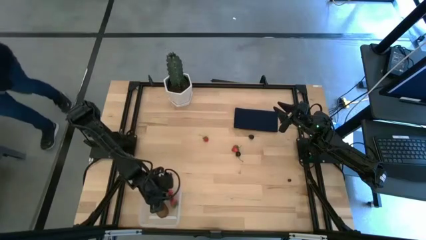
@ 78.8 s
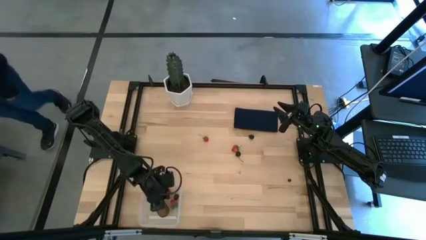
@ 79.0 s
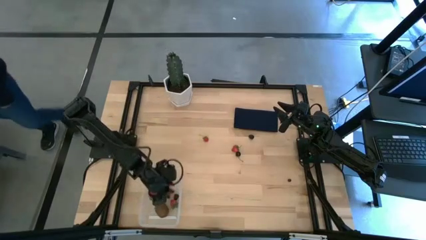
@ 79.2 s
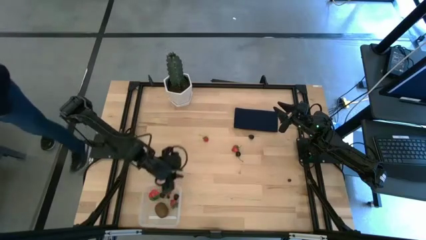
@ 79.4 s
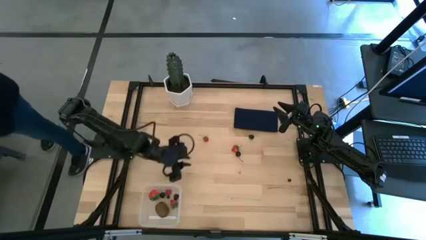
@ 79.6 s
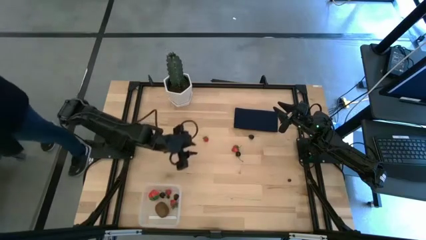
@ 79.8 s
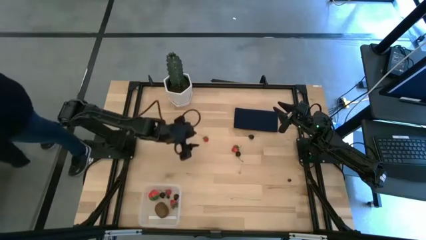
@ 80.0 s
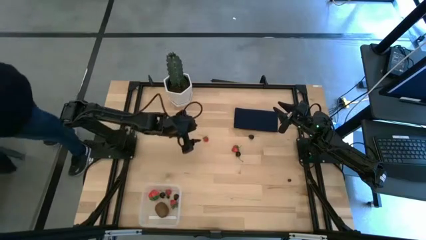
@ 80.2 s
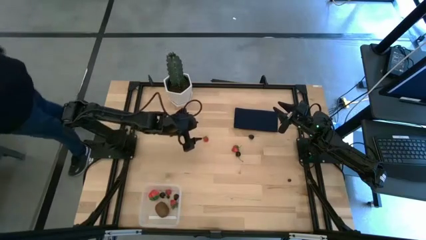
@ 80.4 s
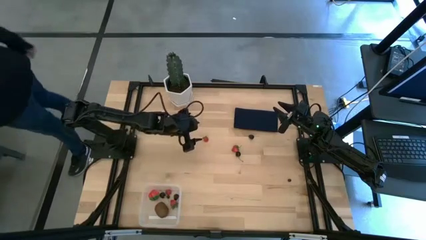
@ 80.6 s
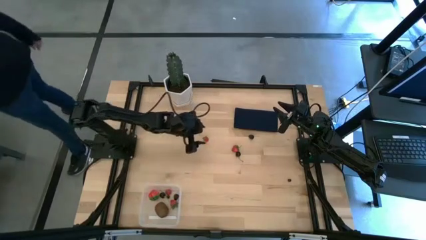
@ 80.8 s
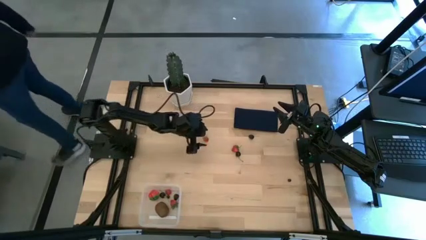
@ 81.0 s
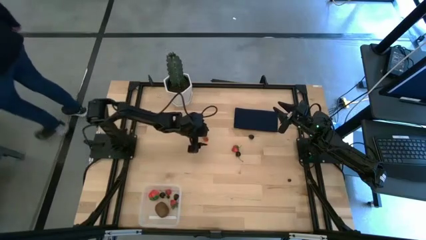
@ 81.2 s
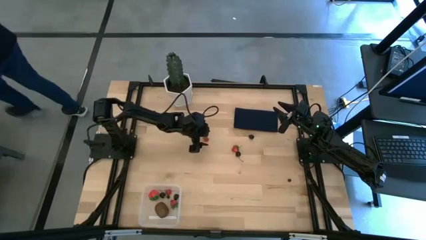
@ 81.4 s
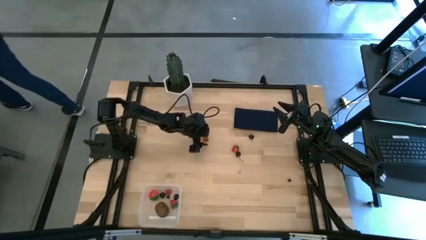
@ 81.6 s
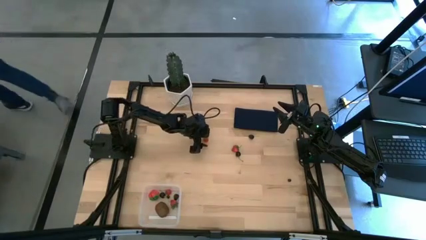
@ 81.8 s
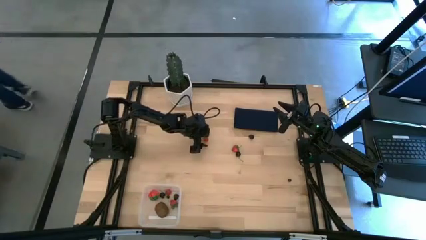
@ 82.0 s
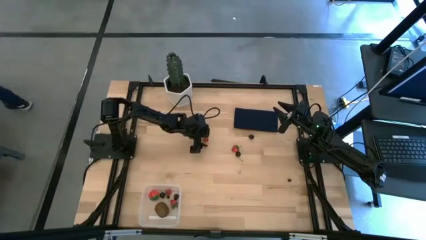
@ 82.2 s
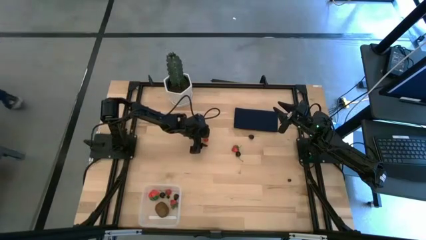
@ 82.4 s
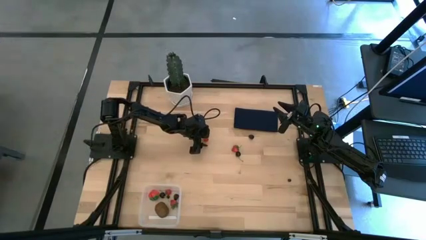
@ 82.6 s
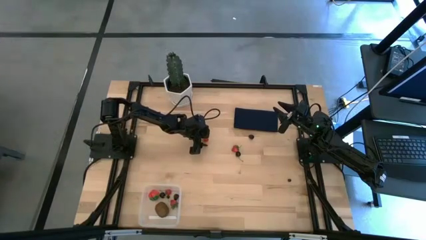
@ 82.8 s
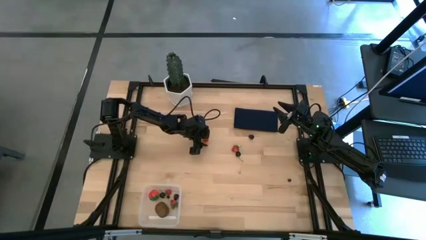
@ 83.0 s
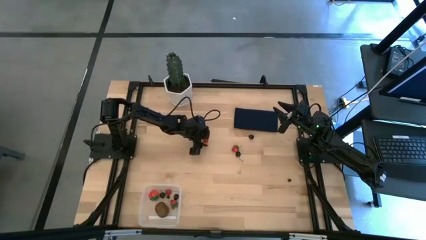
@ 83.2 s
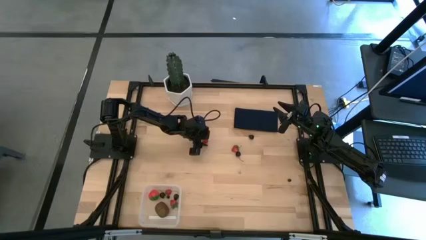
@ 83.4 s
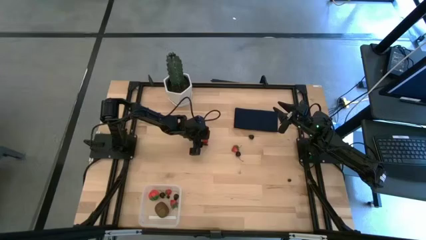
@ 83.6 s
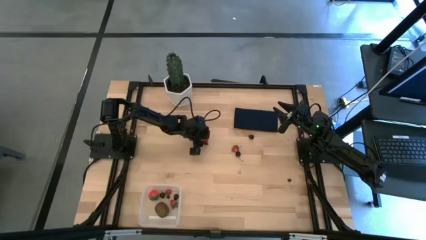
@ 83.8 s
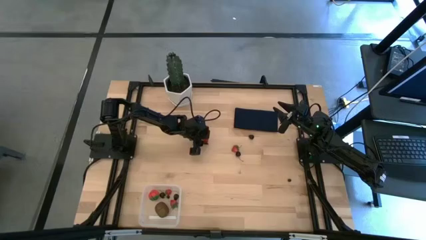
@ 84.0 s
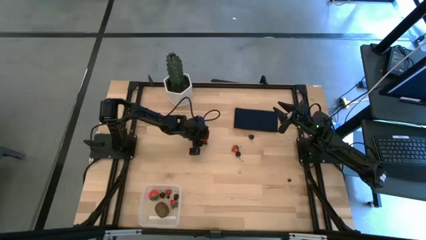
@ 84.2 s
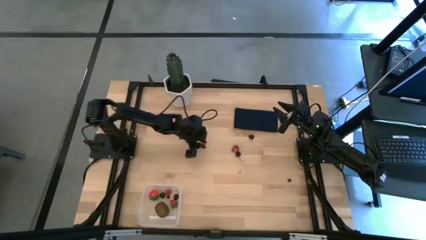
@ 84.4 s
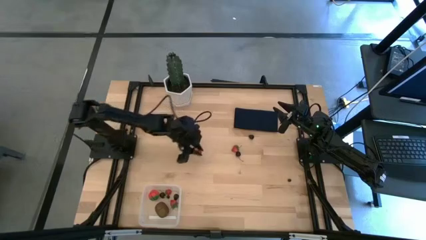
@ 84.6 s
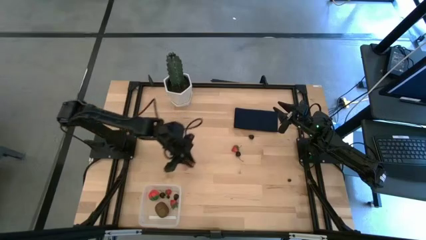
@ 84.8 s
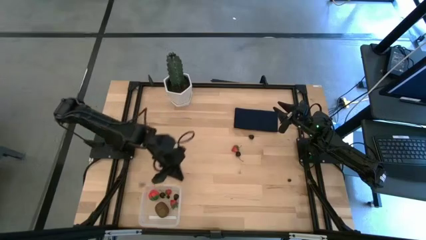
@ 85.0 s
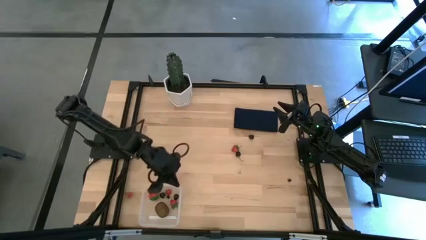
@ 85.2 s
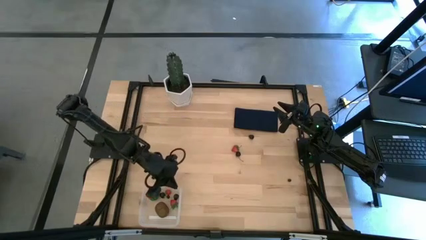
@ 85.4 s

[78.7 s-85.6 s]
Task: Pick and placing Produce into tupperware
Put the strawberry in the transparent bin

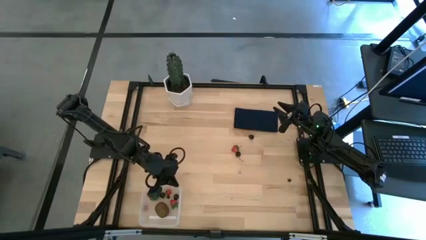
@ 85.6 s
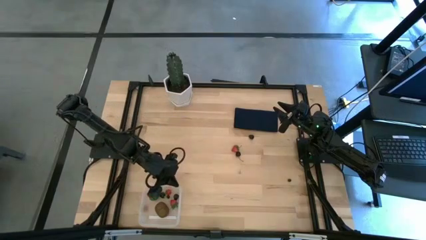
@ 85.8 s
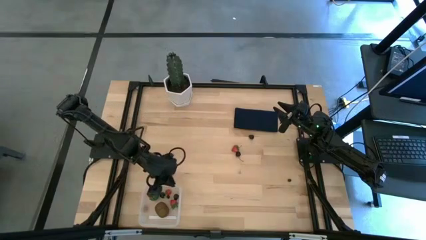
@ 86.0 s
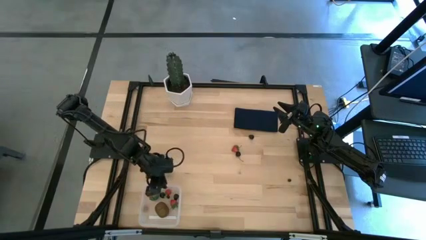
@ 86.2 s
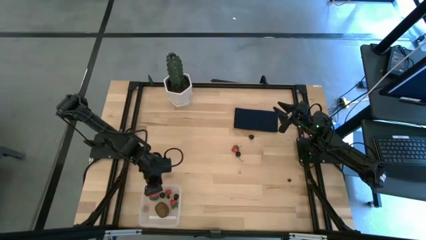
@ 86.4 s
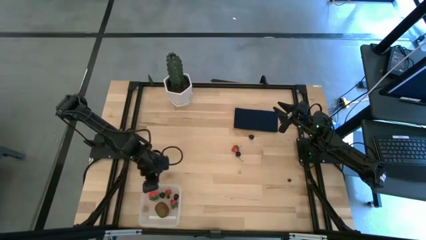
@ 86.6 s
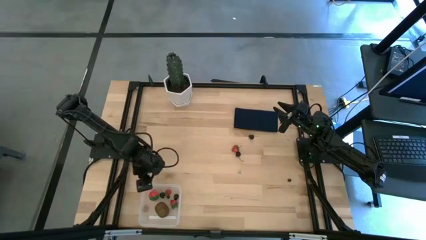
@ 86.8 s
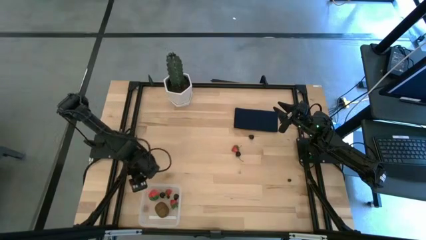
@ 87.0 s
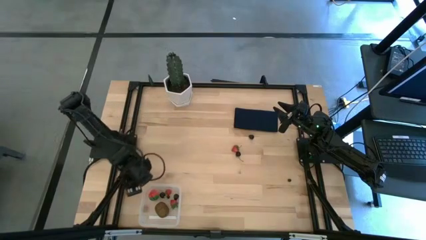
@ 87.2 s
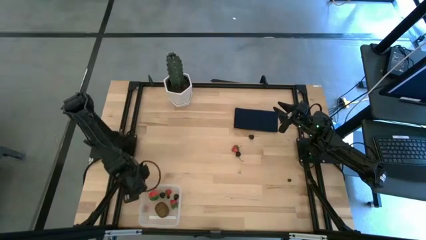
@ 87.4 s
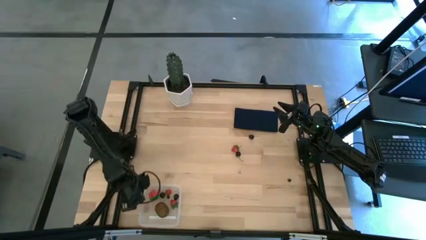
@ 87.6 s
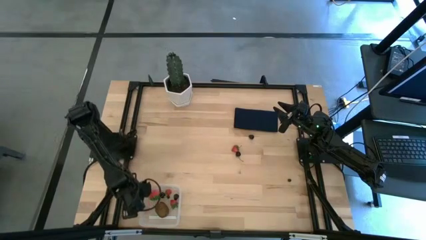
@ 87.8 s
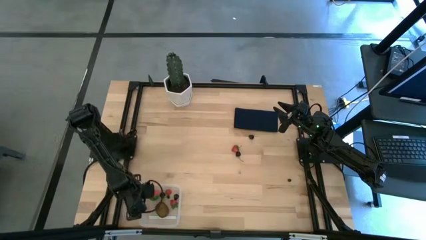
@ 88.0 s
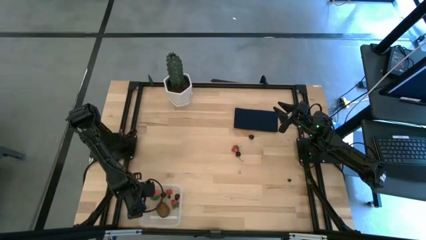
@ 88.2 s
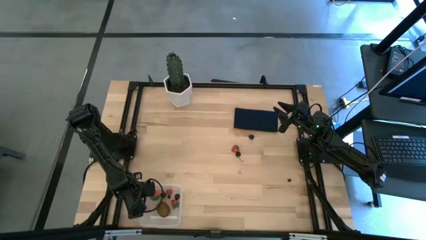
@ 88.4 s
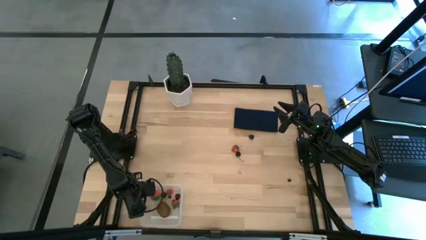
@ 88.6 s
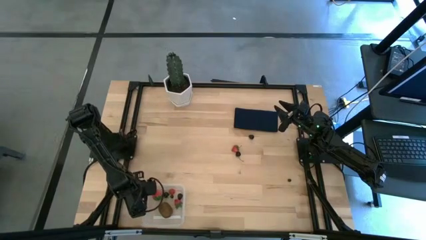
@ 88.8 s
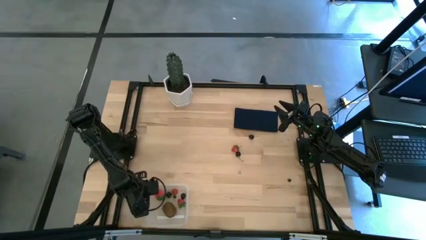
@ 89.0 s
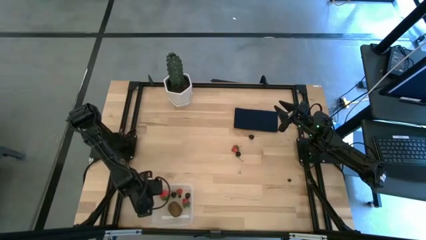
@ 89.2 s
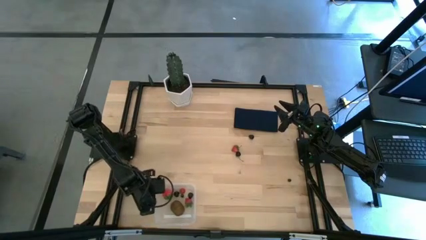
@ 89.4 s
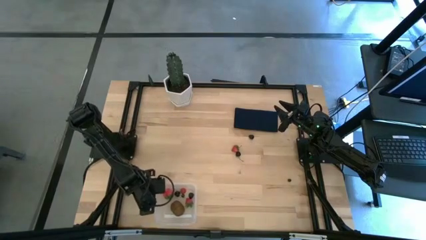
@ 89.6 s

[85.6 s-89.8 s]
Move the transparent bin to the right of the table

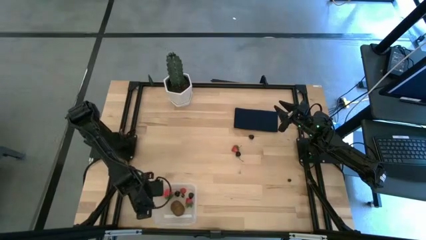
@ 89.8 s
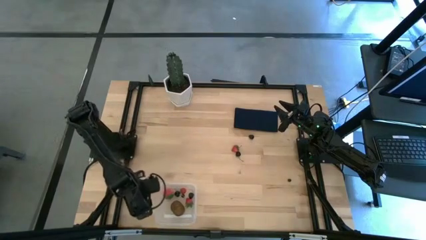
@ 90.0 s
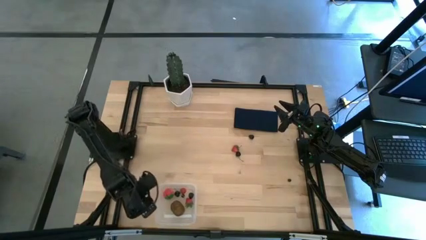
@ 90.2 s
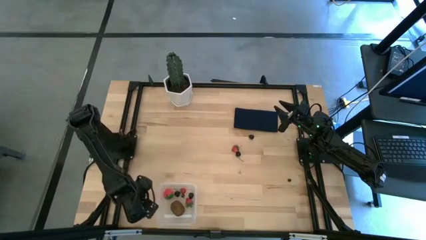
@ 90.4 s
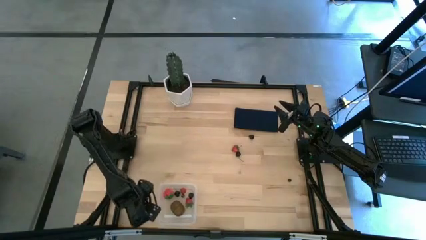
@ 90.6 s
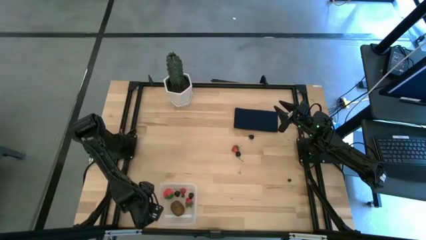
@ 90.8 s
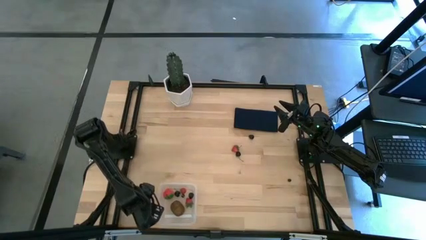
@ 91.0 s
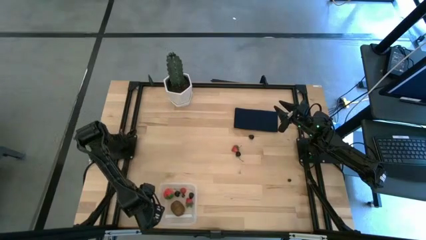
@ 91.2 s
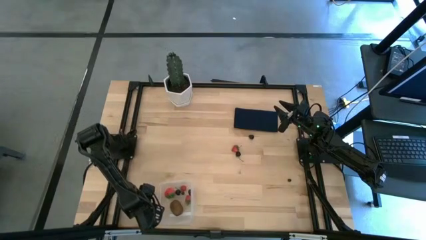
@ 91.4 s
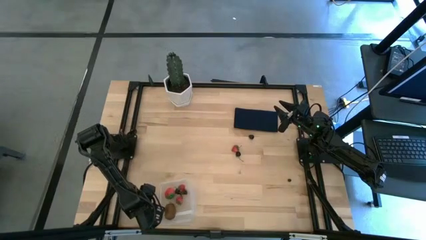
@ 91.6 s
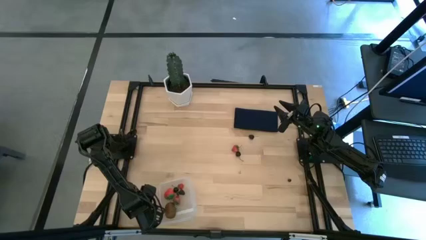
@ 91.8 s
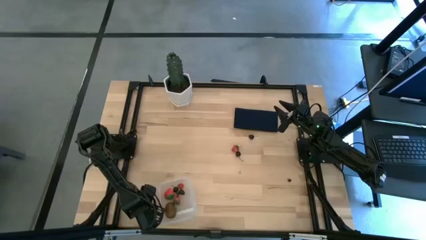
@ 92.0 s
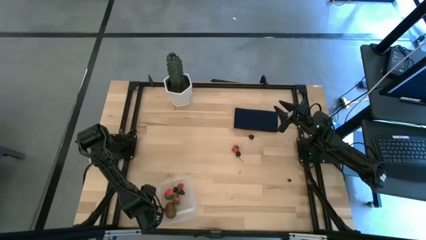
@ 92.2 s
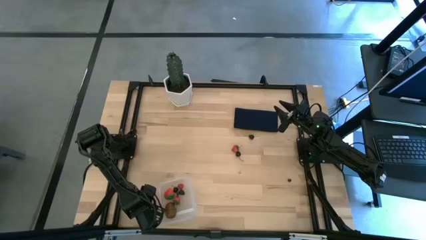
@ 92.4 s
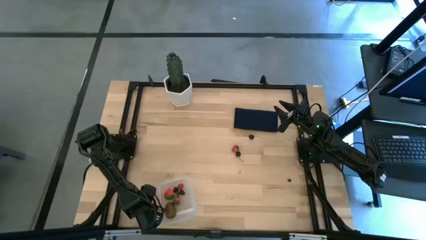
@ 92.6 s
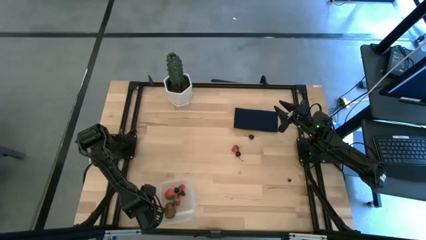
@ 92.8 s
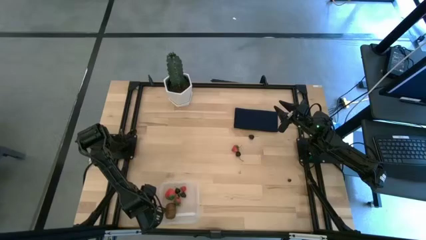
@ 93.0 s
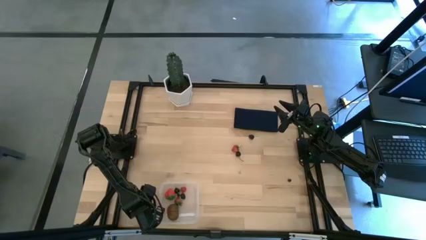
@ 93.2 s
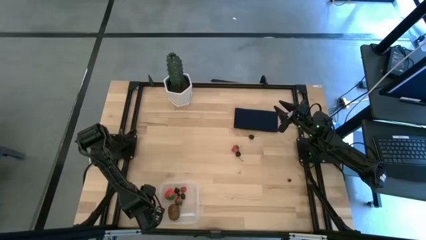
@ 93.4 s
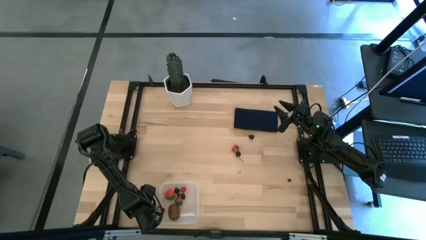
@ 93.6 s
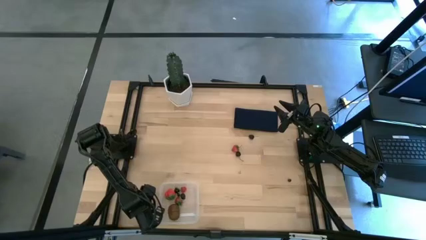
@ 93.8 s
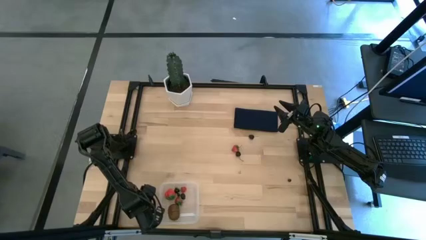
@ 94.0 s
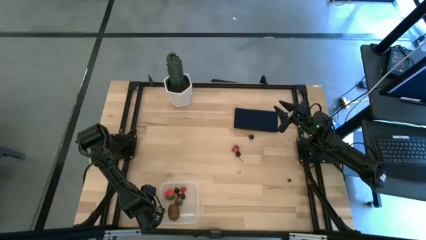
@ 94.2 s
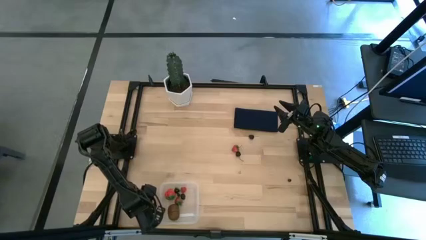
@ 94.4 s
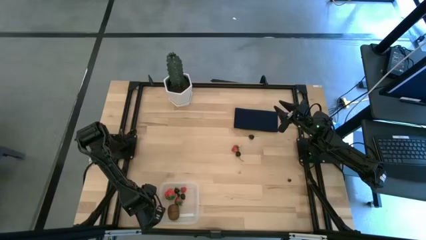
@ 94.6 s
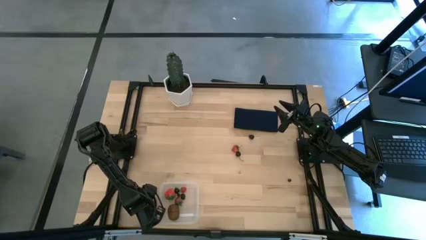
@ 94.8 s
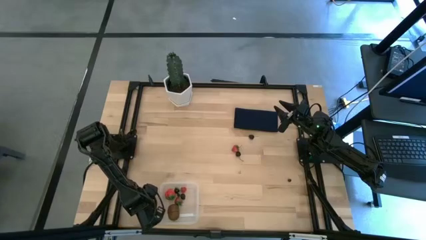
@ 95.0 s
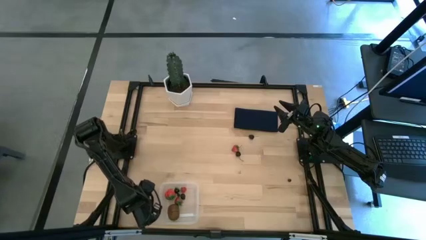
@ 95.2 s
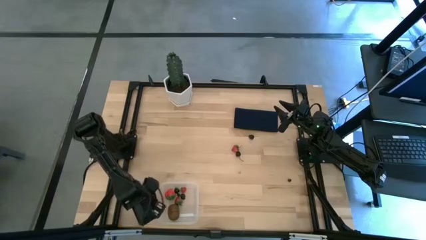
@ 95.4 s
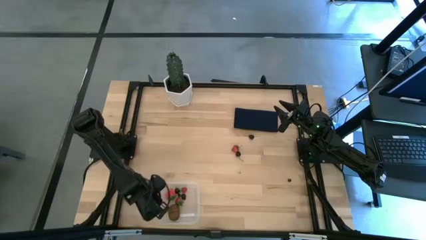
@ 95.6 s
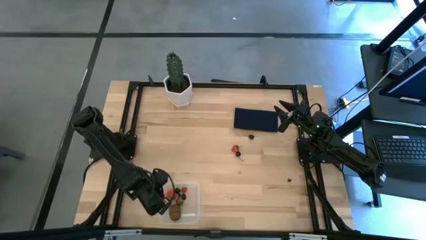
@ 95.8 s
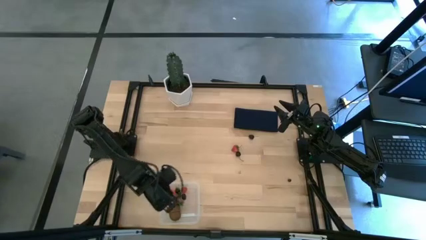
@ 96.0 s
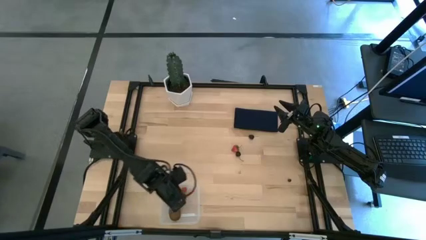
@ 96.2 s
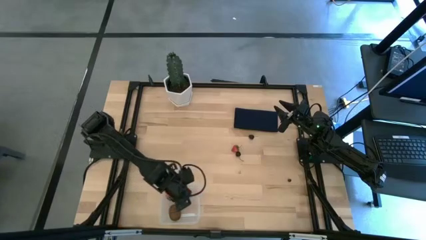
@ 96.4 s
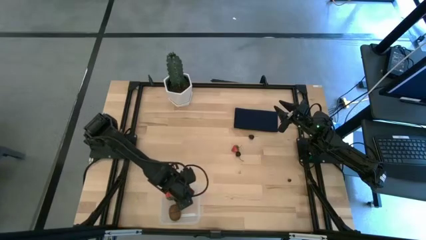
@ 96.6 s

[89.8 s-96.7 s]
Put the strawberry in the transparent bin
